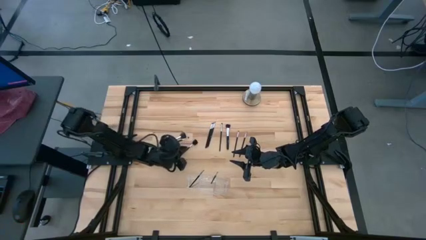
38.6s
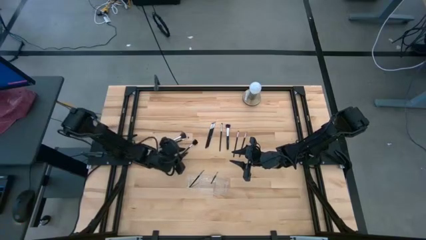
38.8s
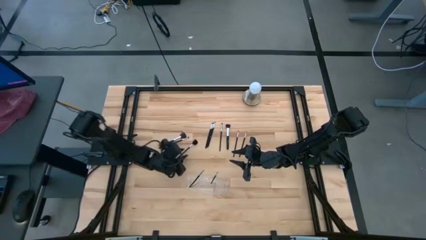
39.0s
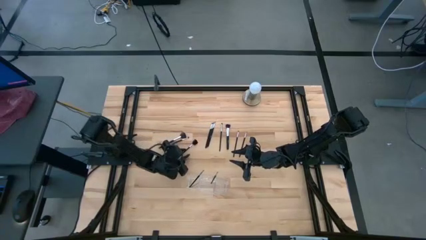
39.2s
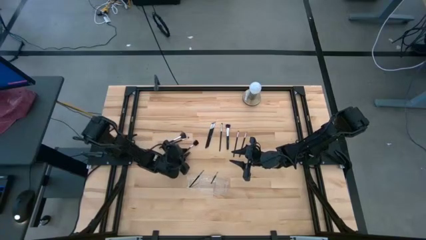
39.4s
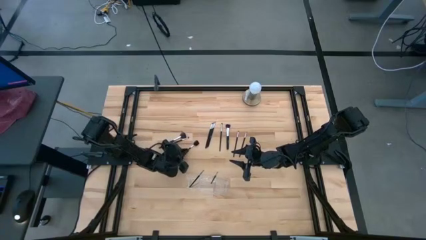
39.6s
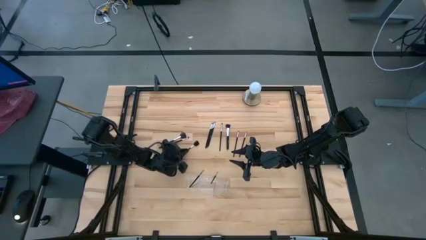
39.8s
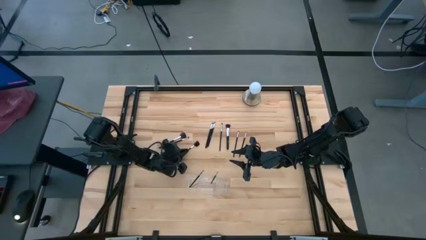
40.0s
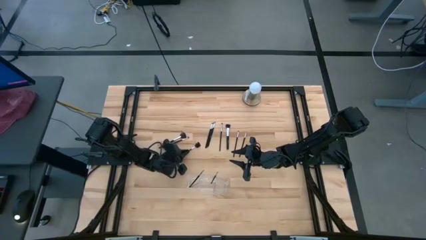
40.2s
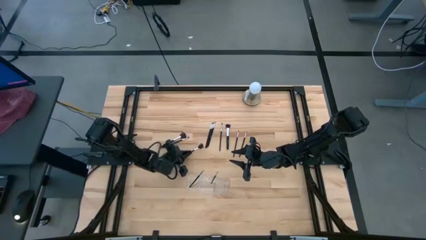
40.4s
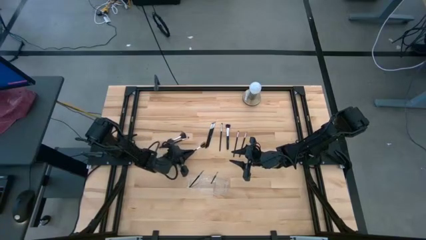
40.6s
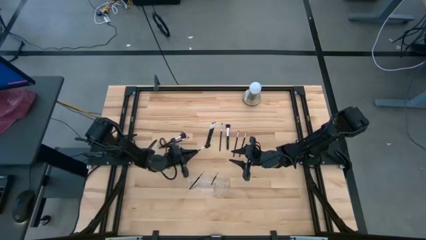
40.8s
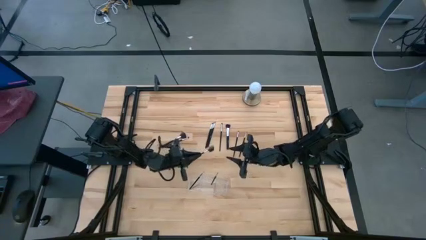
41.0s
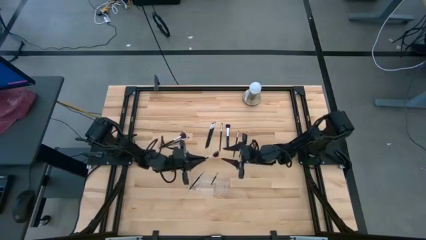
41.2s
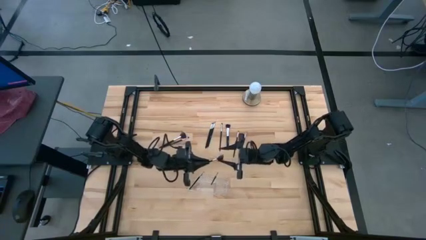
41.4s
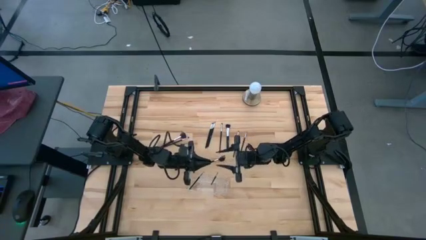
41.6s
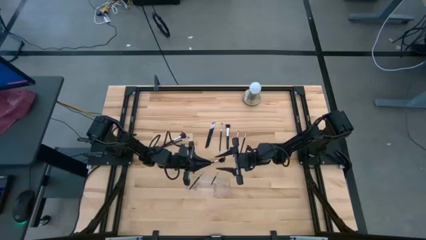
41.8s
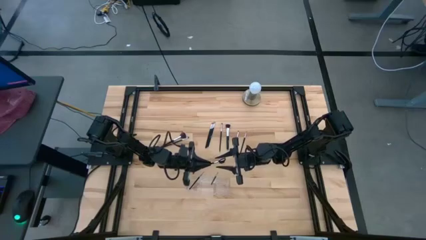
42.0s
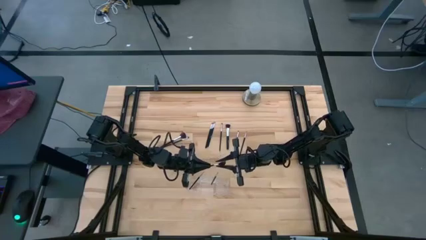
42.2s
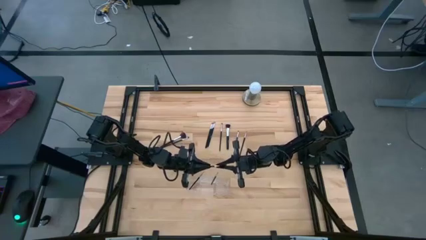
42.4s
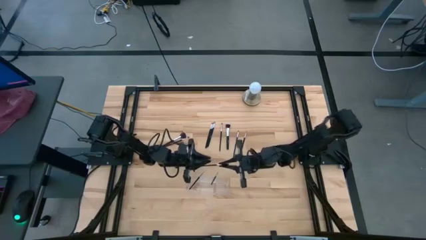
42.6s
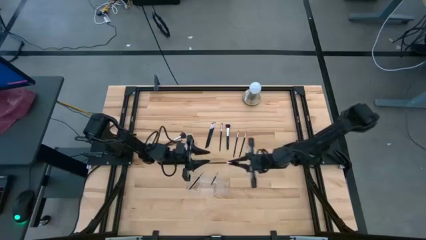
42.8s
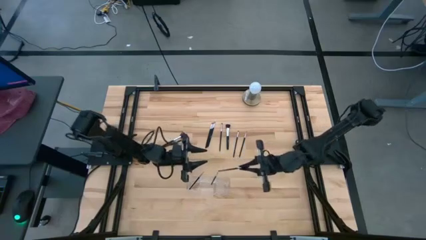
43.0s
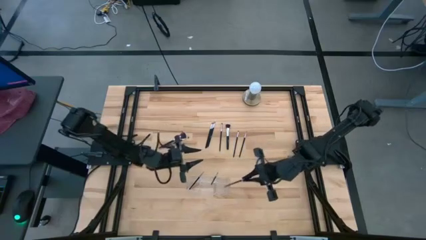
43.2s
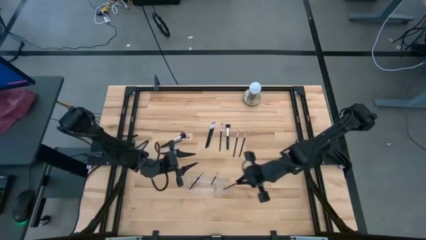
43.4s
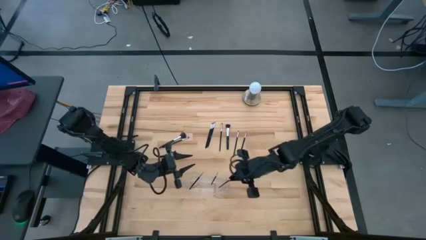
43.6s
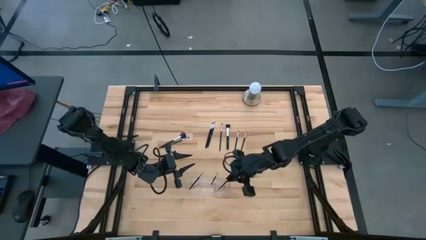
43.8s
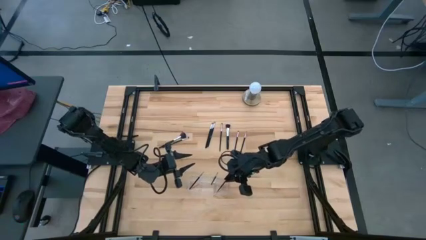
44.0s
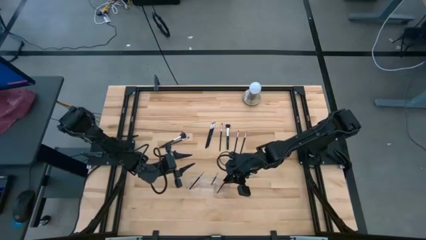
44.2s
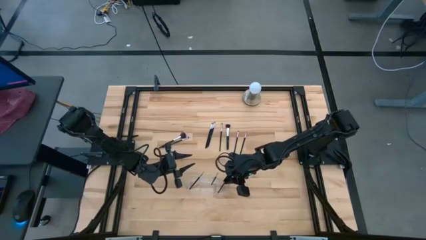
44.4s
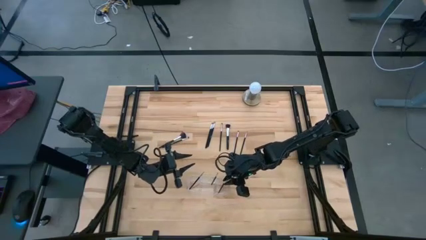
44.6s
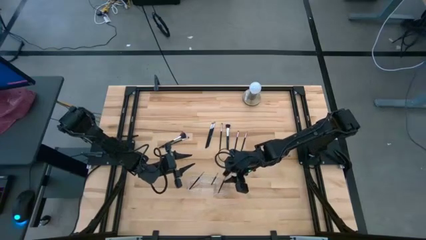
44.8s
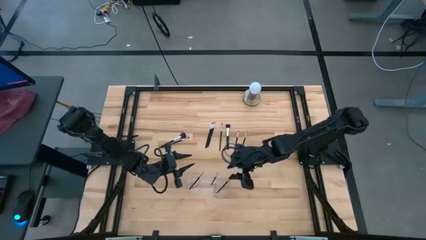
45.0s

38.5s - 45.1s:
Task: Put items in baskets/containers
Put the black brow brush into the transparent organizer

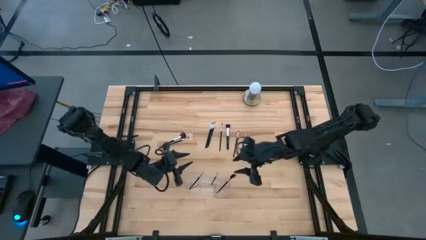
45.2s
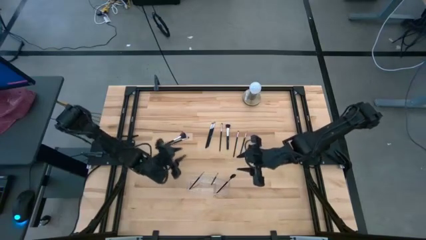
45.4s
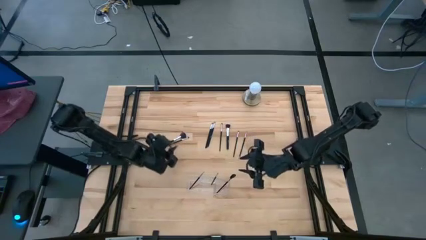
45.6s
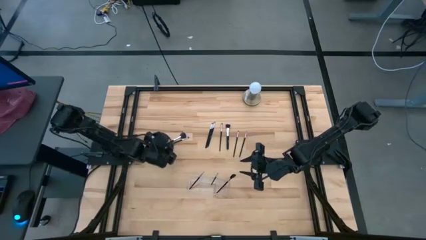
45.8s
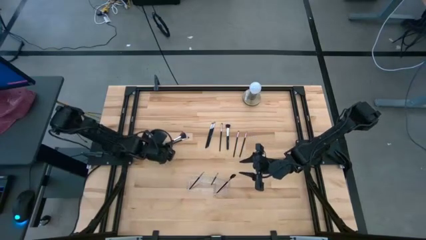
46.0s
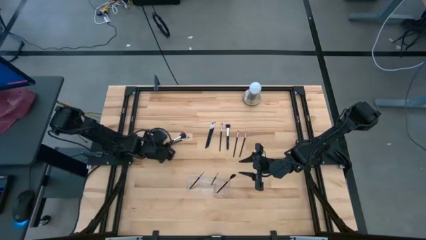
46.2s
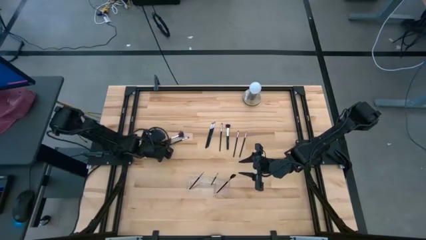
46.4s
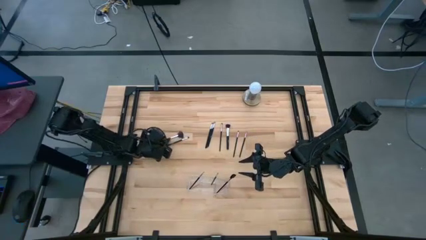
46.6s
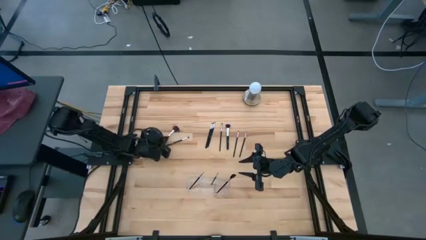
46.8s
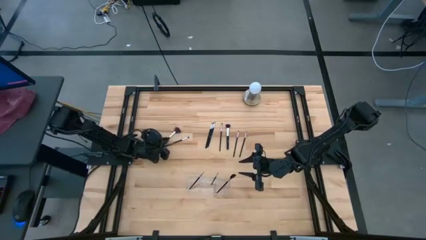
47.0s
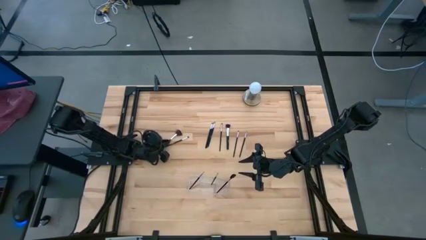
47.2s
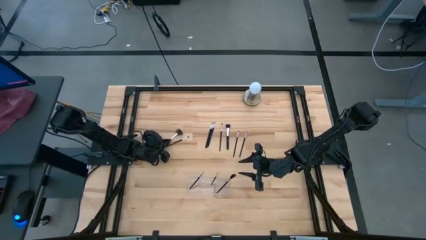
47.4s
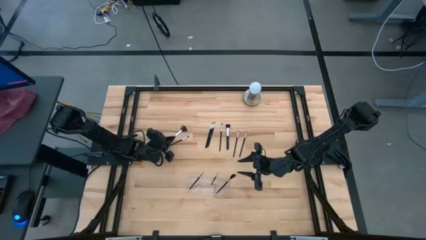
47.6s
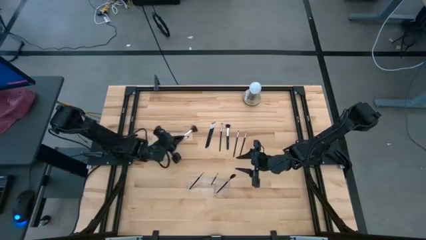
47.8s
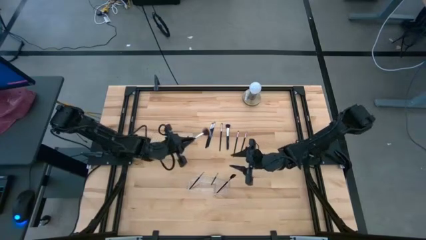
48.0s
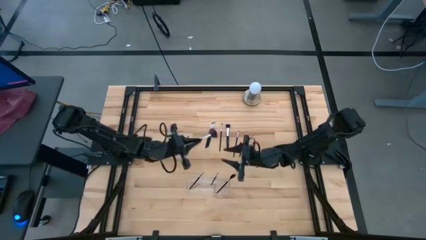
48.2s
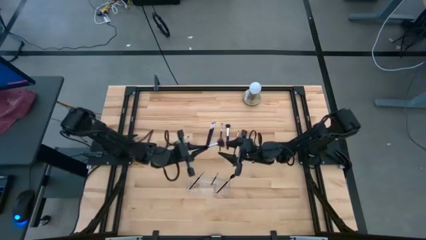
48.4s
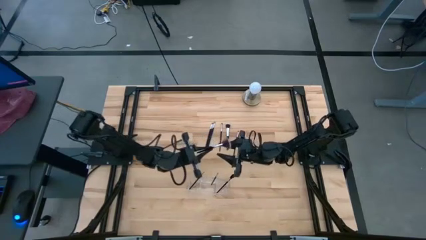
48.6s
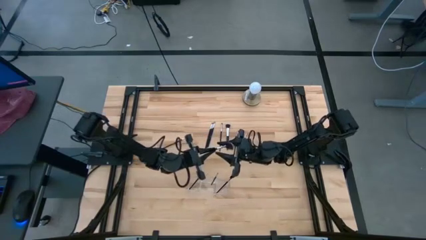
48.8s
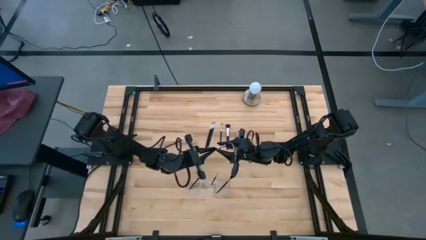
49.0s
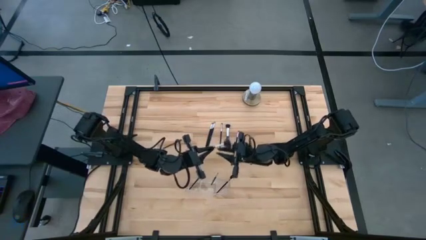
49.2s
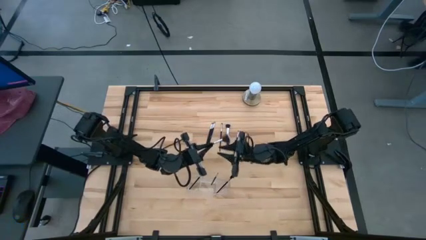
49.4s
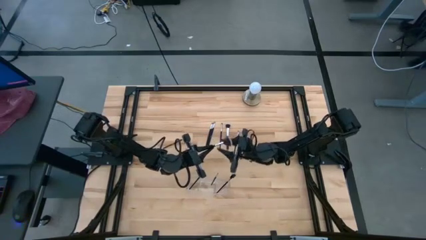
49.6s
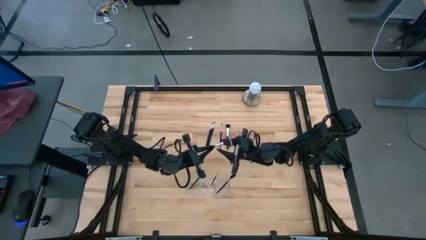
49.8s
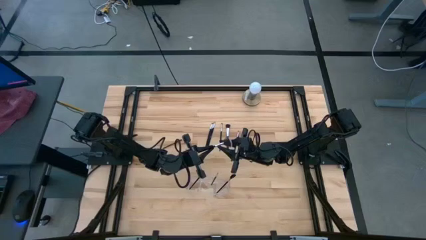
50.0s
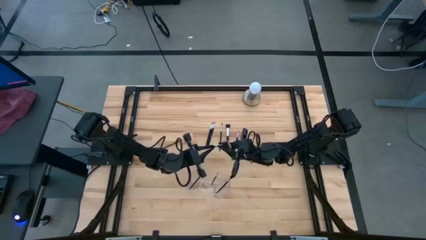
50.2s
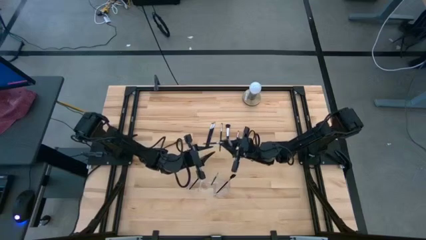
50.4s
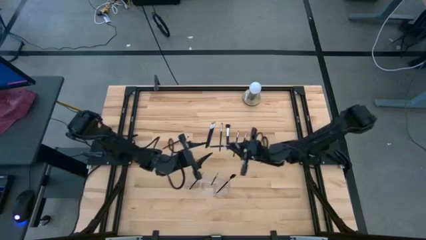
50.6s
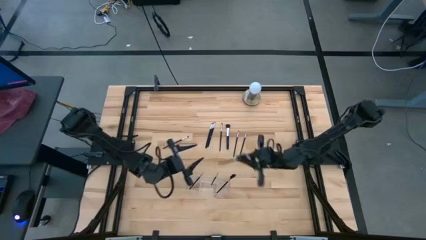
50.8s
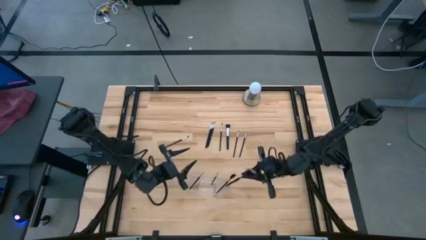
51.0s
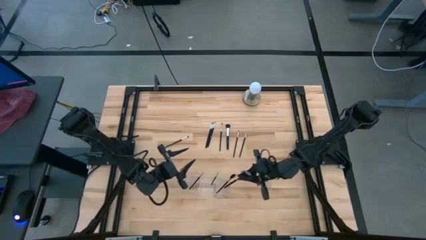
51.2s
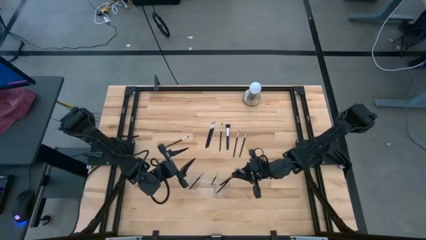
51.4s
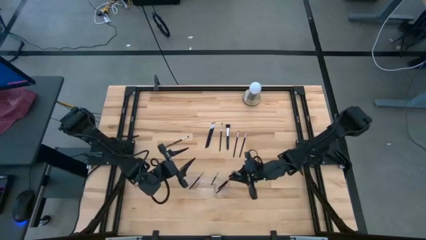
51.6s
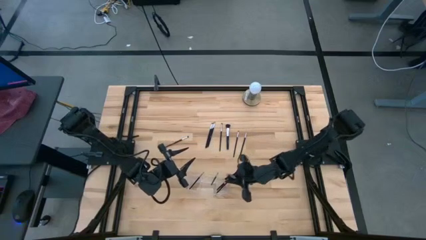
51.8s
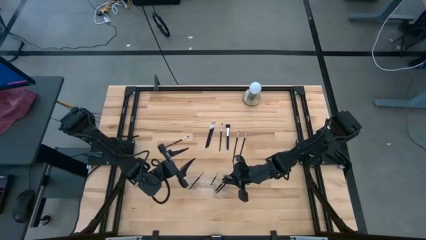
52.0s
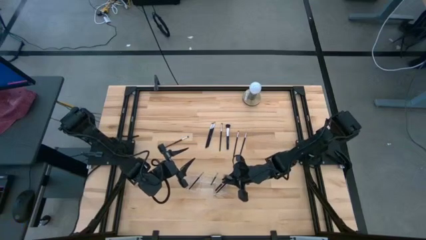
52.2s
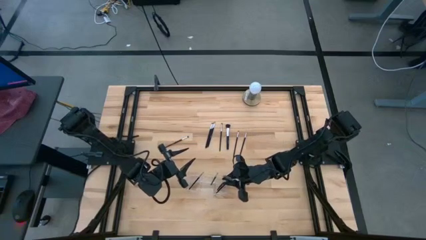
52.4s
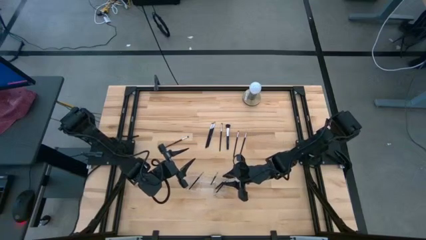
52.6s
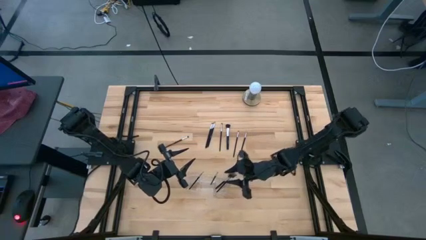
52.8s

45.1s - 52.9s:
Put the black highlighter brush into the transparent organizer
